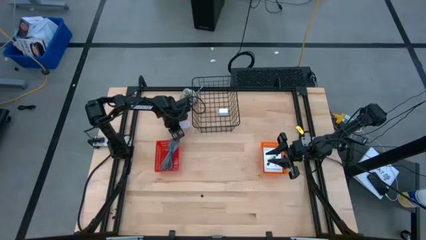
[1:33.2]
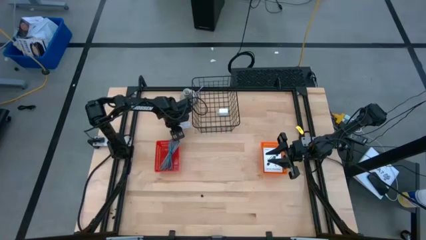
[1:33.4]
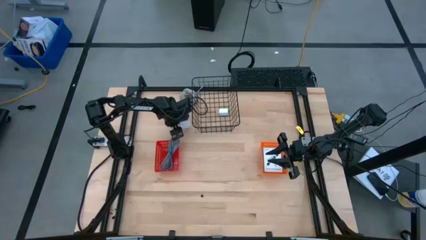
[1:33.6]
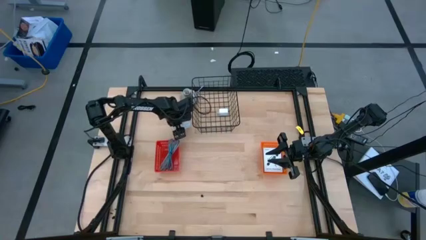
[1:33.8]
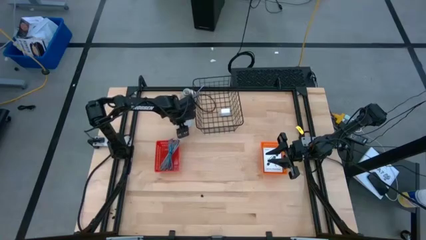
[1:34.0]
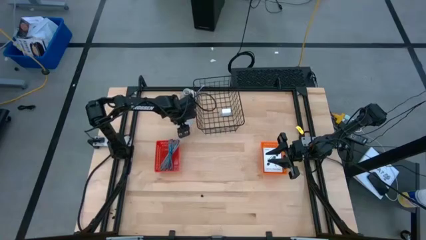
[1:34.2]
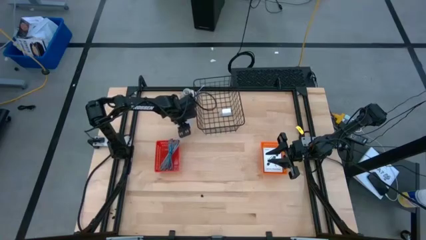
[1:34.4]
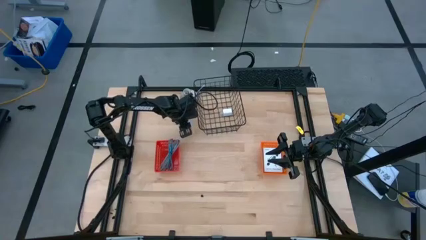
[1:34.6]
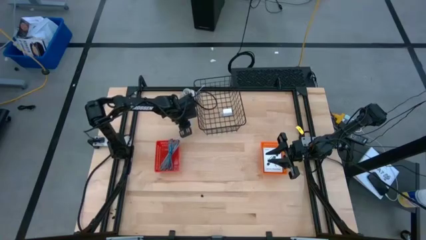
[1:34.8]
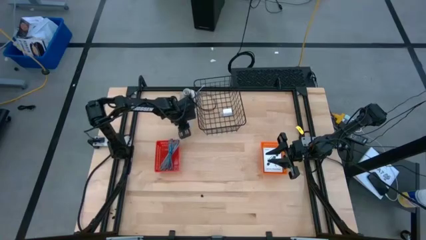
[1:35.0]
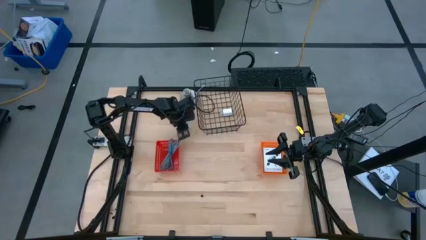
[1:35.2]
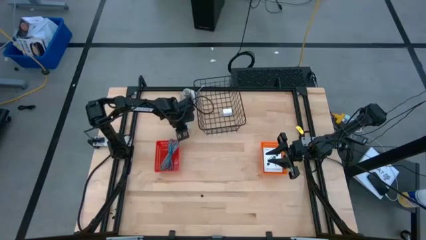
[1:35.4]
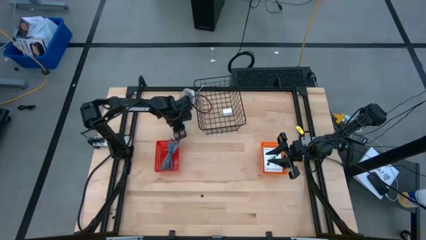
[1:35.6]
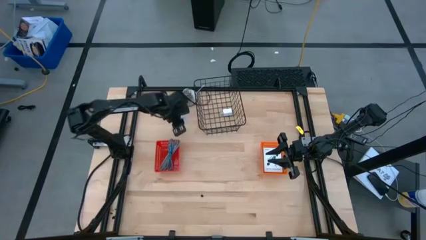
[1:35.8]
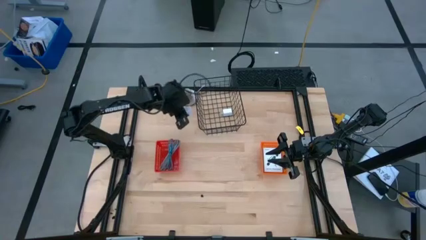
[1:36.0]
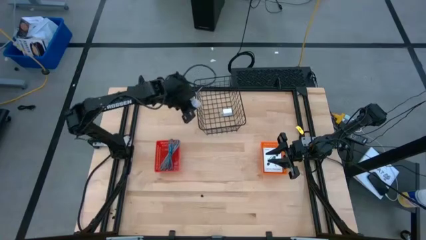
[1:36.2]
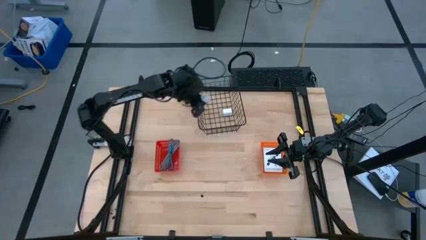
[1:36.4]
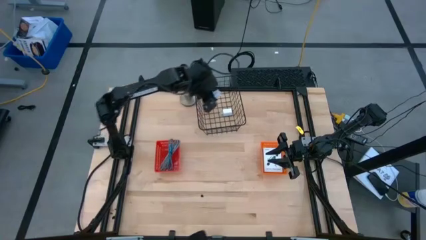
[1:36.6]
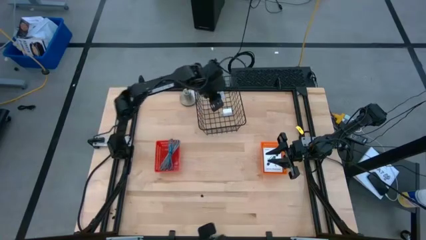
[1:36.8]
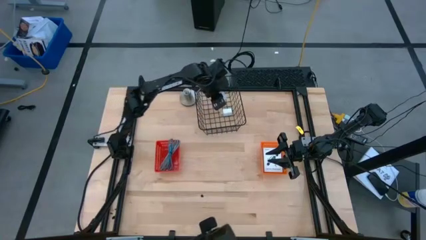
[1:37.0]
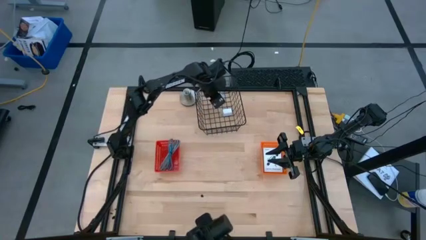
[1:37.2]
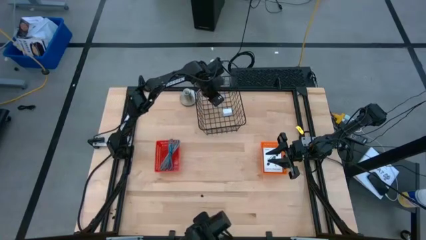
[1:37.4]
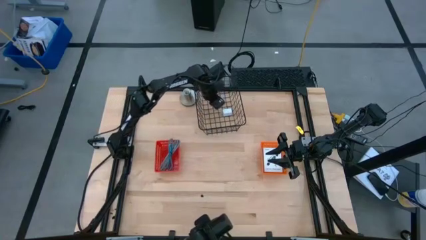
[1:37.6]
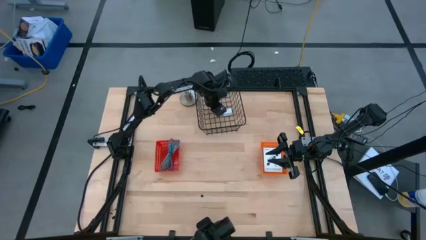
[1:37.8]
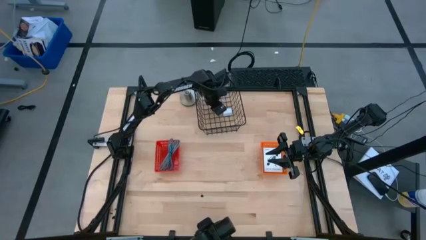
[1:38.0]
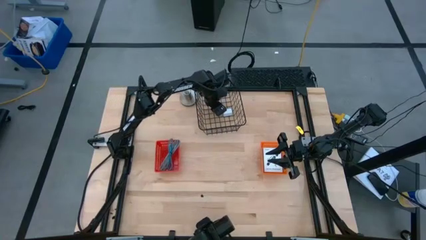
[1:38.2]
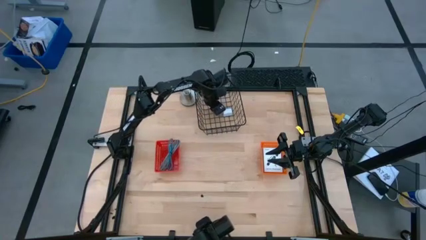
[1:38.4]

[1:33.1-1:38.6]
Task: Pick and place items into bin
Put the white charger adapter into the black wire basket

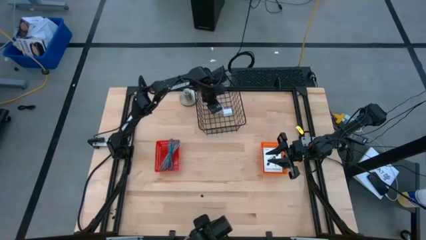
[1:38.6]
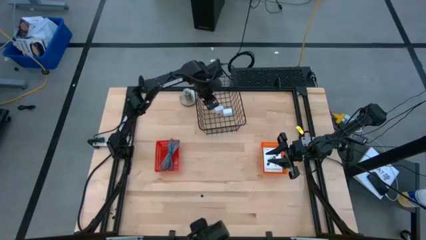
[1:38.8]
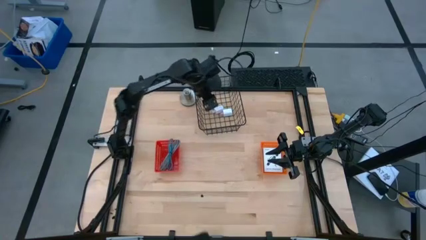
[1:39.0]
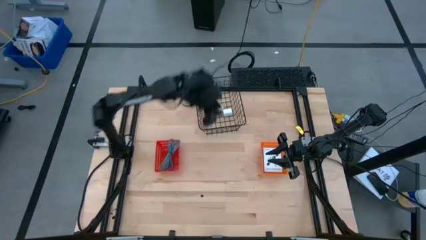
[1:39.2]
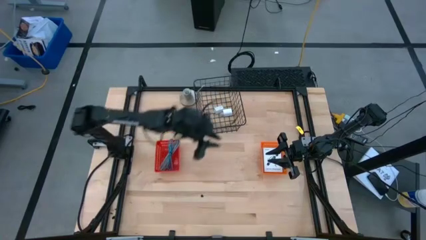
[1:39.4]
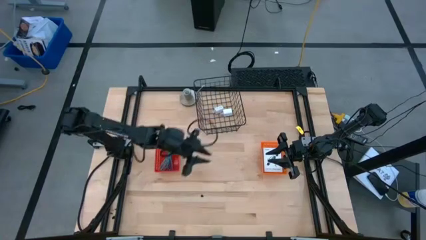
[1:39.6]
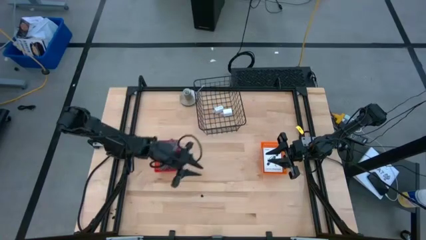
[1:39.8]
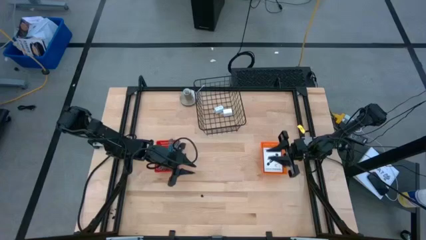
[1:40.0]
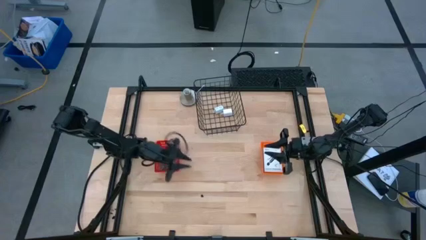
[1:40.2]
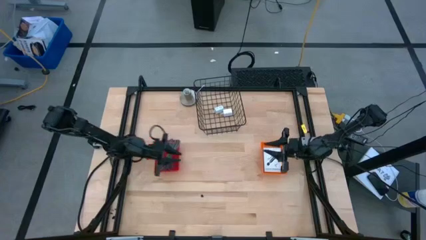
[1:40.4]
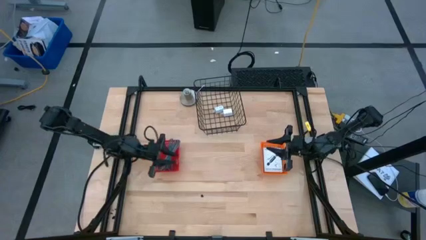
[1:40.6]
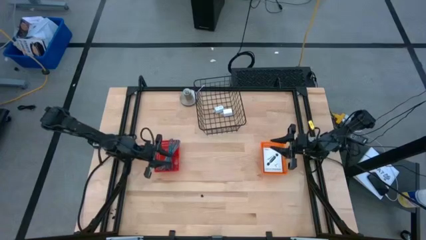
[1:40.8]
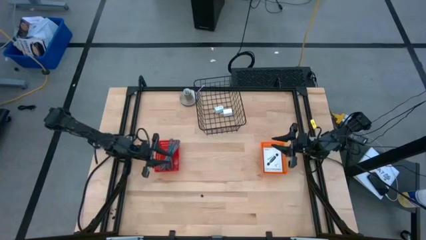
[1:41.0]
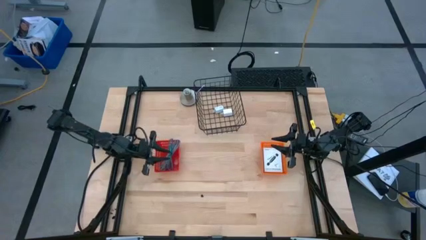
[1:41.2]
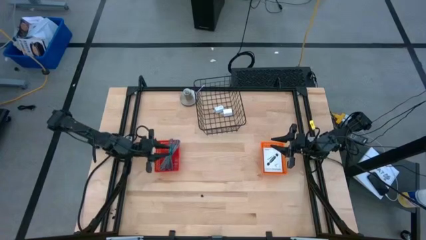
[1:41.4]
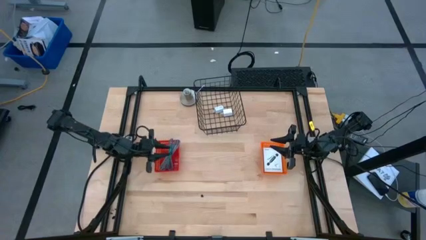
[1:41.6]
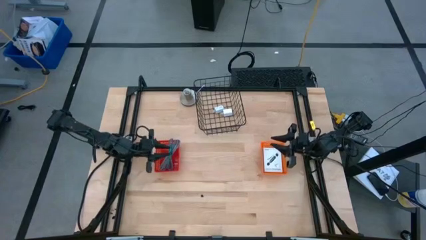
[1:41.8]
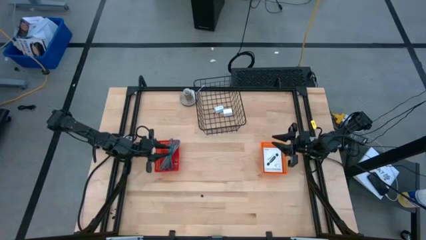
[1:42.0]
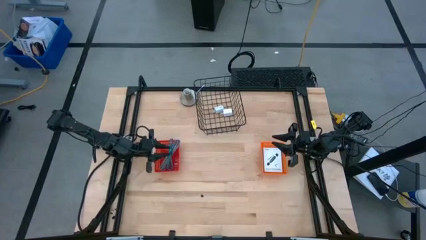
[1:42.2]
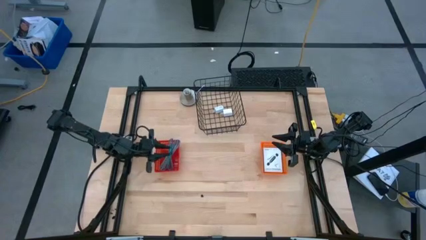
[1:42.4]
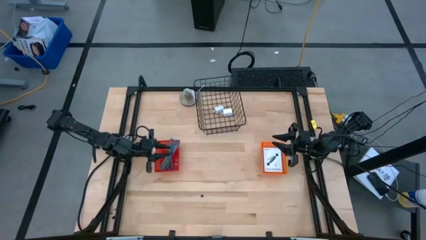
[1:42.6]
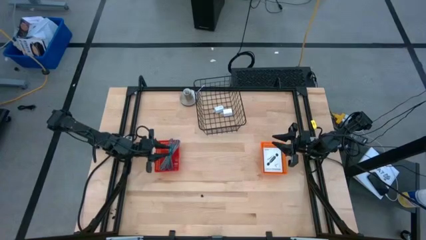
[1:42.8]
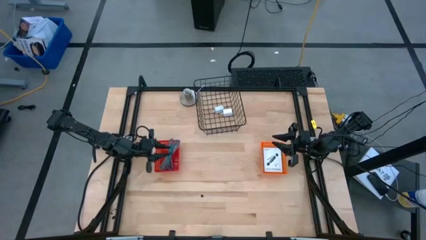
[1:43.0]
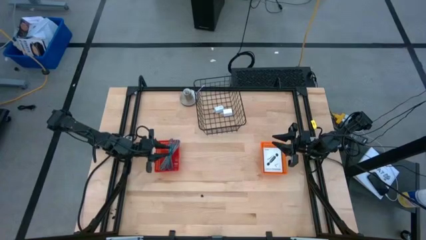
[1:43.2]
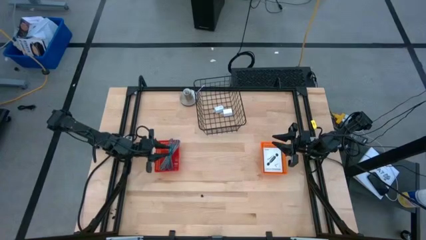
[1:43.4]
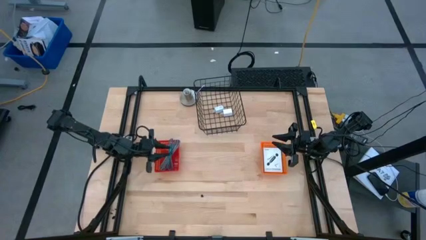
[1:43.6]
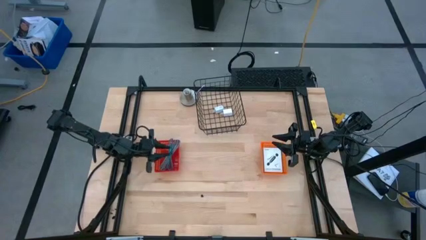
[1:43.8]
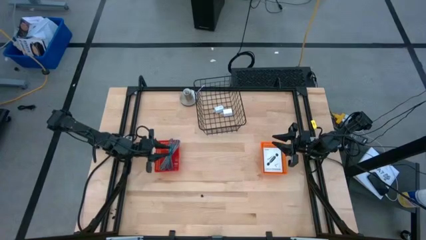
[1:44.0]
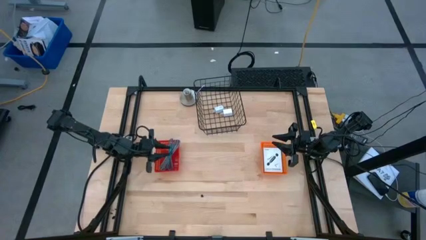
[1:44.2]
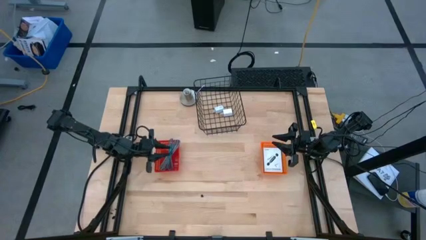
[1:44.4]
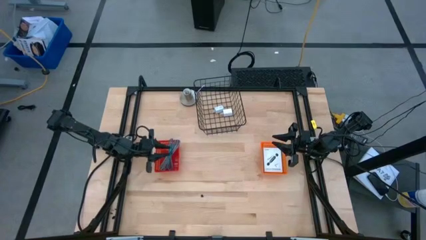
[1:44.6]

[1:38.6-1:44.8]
Return to Home Position

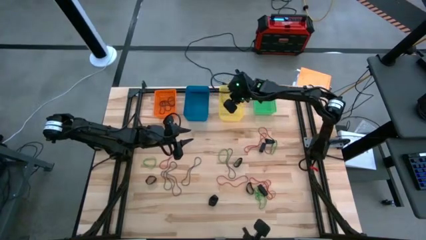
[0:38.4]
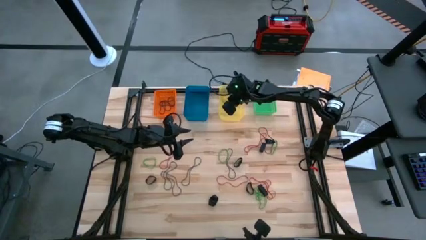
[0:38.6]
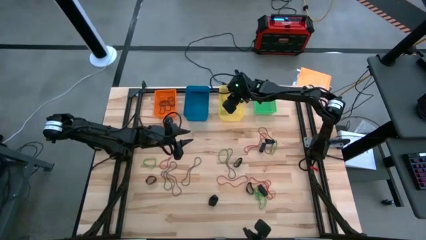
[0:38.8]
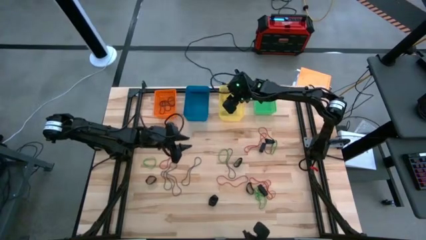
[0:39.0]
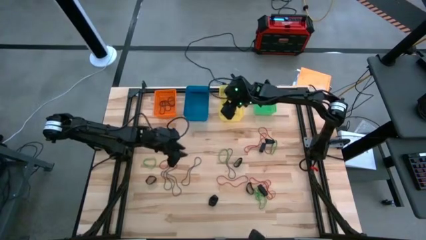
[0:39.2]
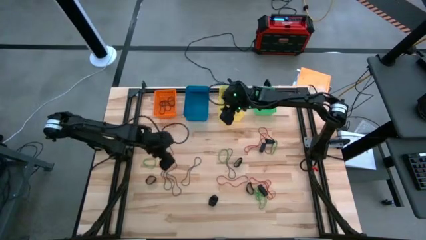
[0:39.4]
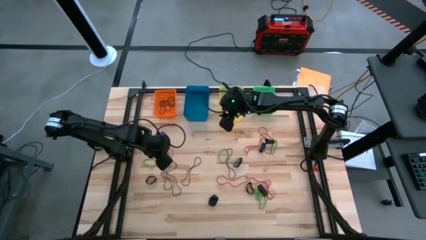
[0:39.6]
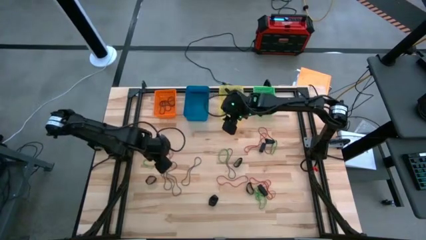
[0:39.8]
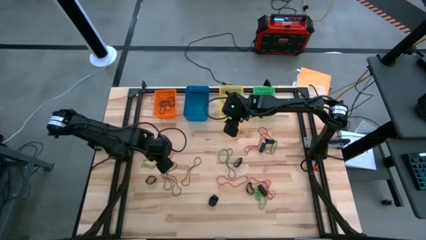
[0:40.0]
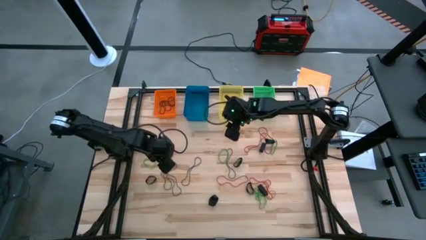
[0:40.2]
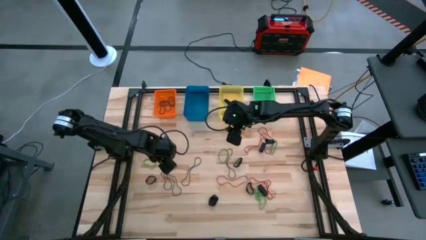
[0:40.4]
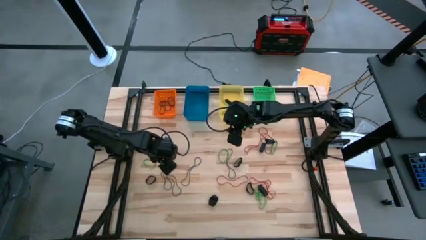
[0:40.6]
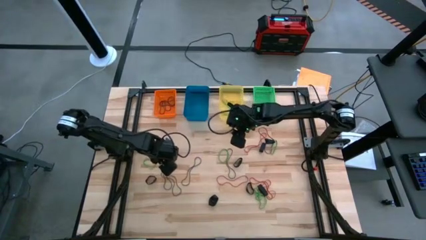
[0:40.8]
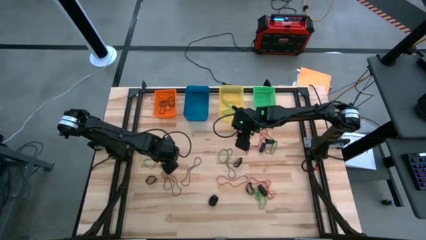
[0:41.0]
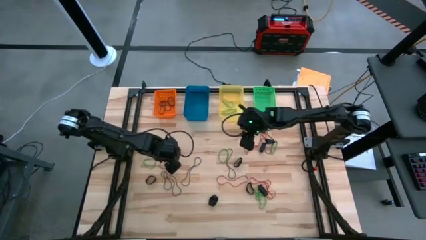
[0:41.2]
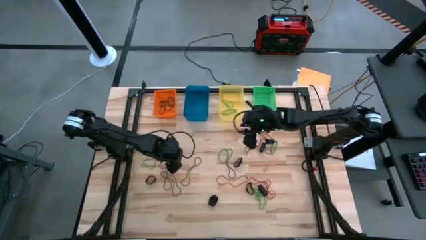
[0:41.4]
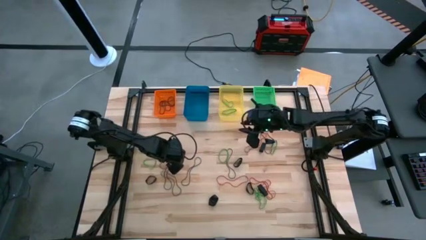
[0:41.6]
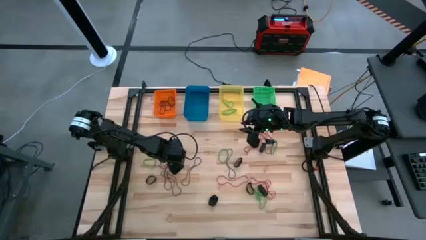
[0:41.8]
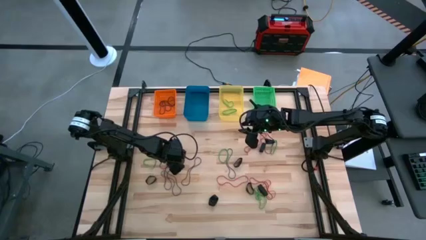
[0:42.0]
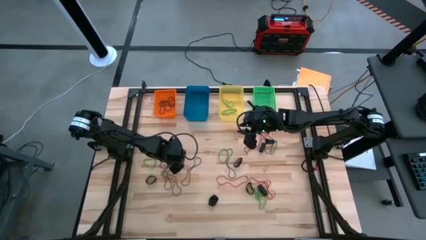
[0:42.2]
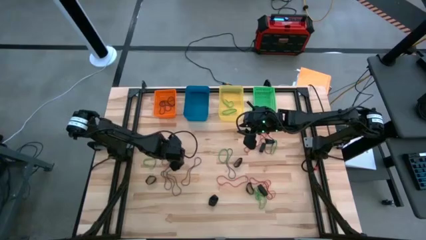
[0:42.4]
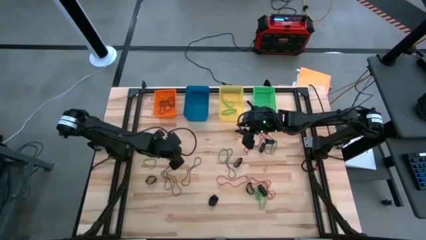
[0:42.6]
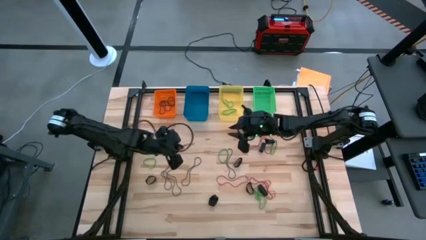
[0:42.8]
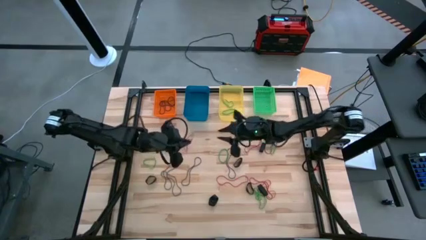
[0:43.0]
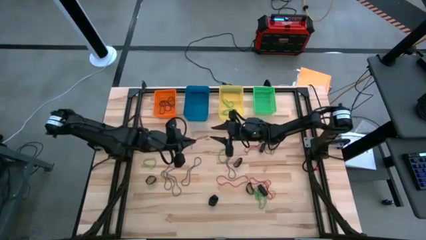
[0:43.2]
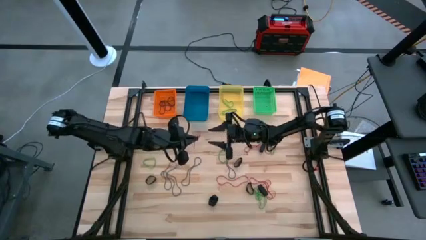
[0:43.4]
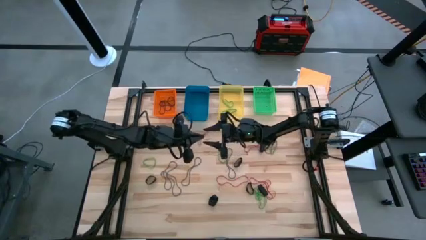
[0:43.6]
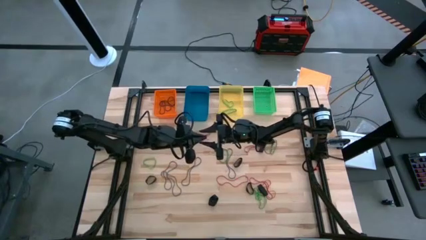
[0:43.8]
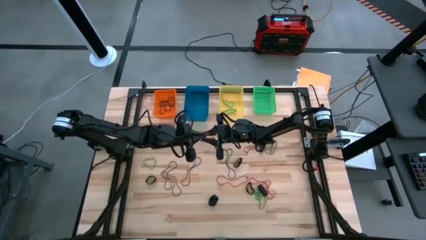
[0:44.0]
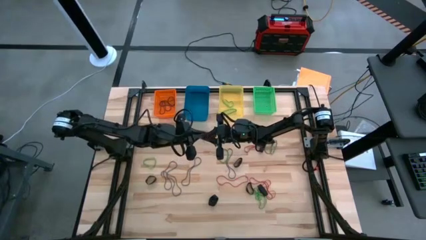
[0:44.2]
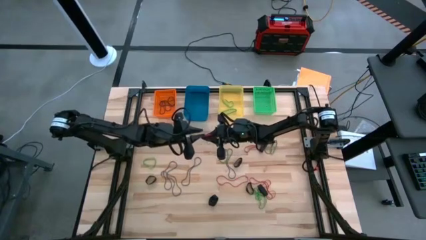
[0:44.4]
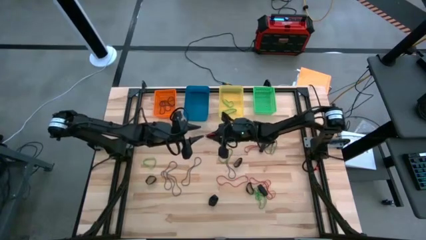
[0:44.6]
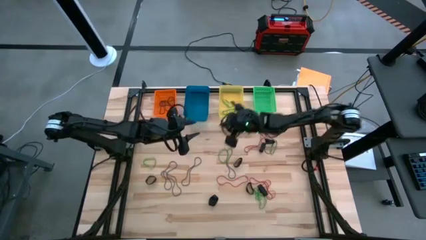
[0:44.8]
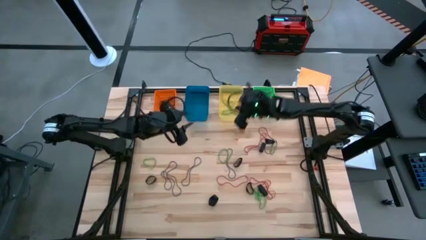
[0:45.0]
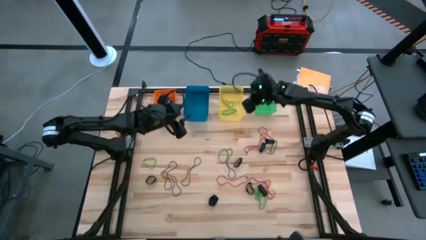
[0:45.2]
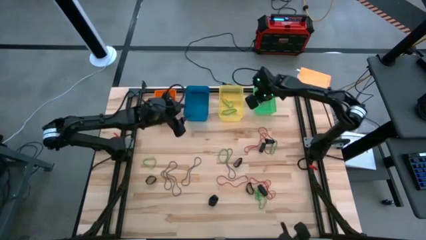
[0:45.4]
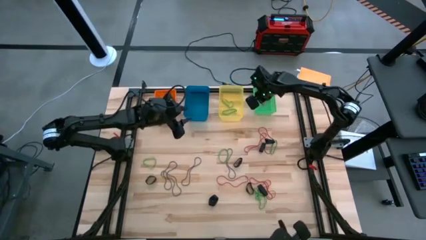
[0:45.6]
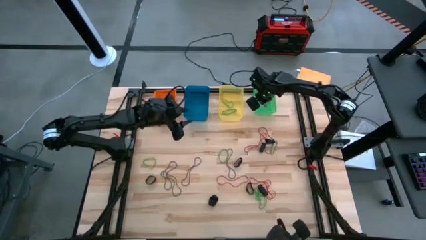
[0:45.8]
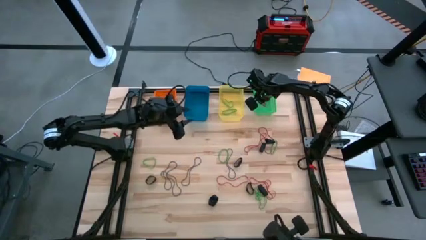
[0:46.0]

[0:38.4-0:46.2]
Task: Sort rubber bands into baskets
Put the red rubber band into the green bin
